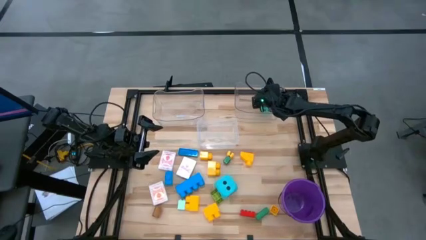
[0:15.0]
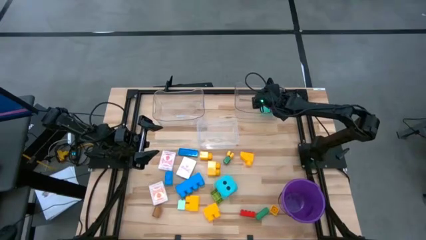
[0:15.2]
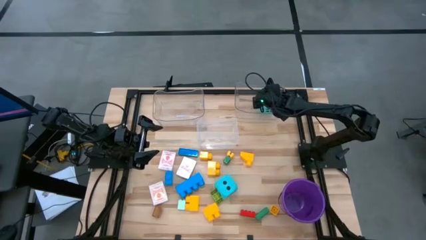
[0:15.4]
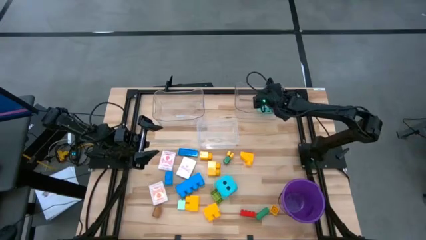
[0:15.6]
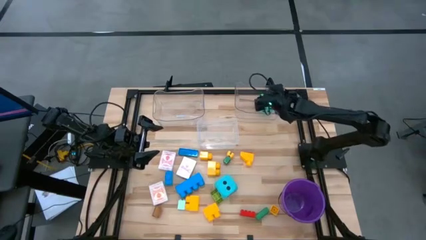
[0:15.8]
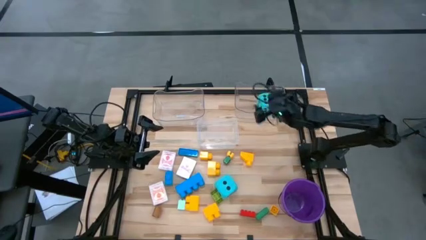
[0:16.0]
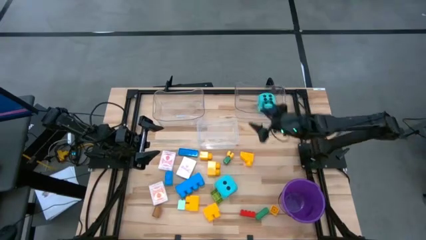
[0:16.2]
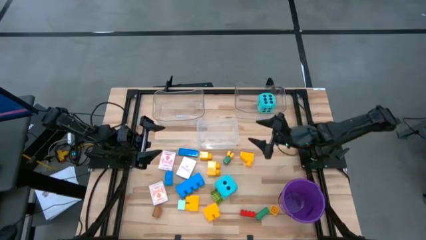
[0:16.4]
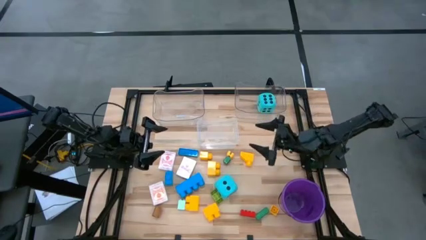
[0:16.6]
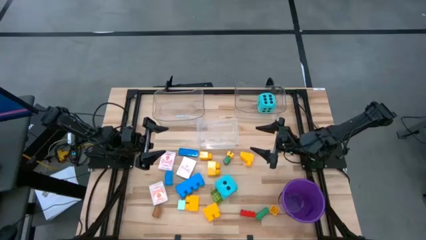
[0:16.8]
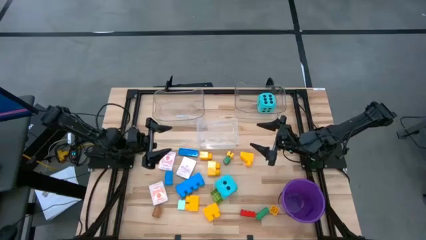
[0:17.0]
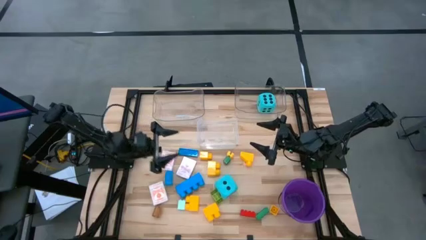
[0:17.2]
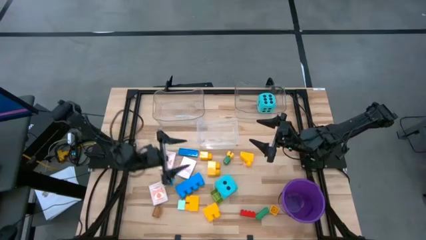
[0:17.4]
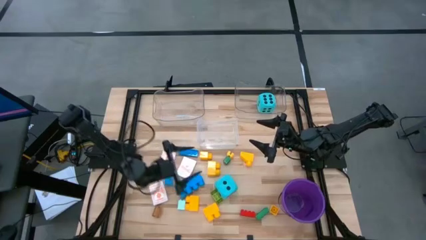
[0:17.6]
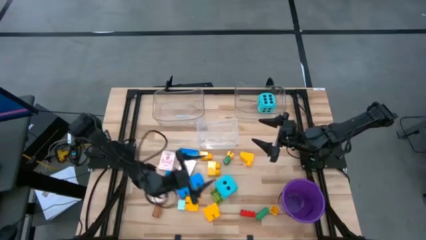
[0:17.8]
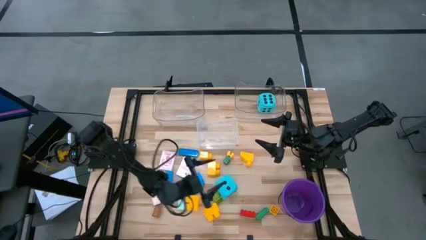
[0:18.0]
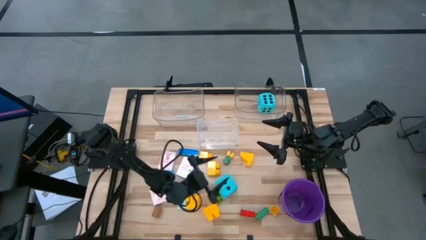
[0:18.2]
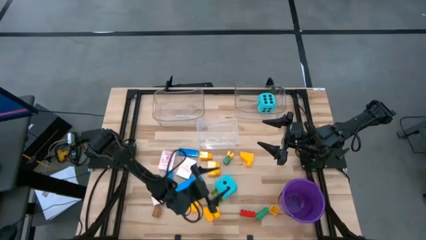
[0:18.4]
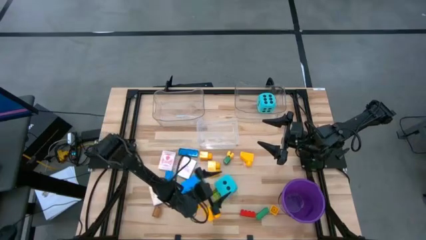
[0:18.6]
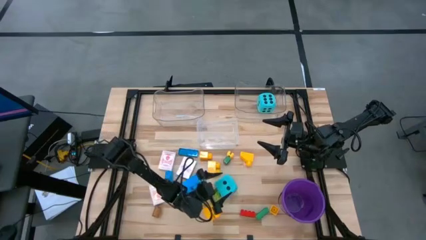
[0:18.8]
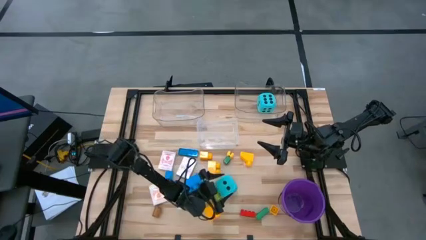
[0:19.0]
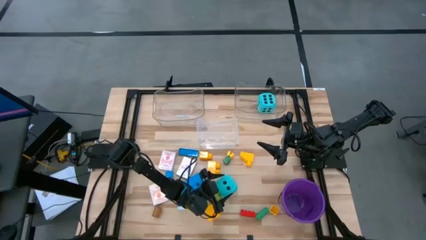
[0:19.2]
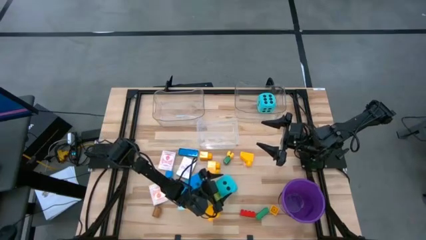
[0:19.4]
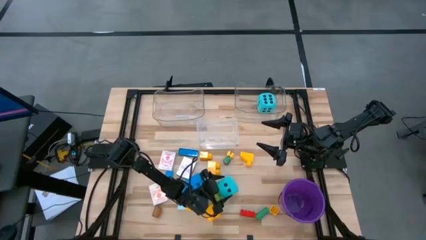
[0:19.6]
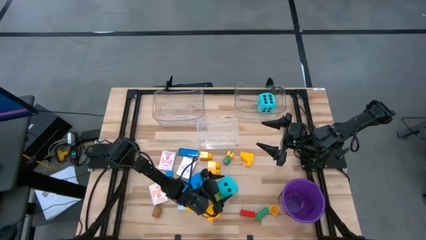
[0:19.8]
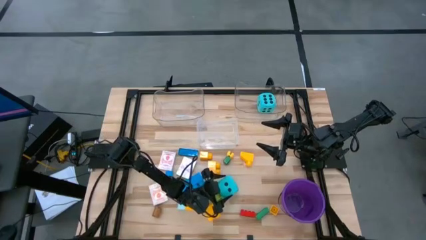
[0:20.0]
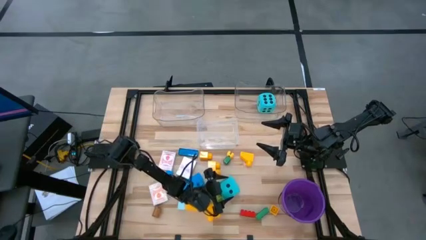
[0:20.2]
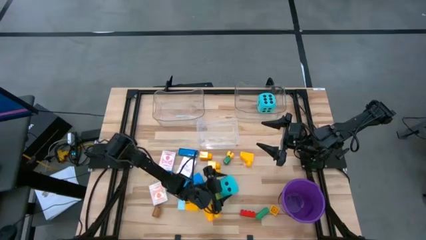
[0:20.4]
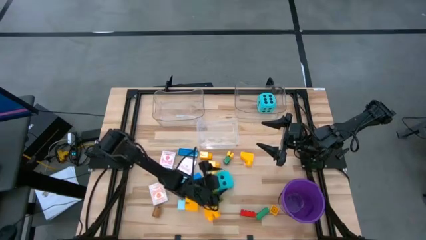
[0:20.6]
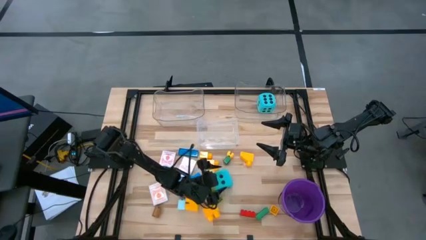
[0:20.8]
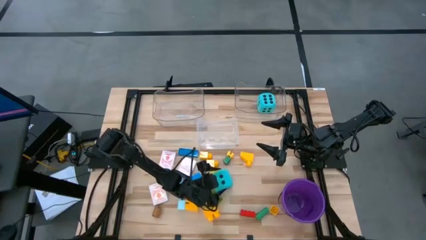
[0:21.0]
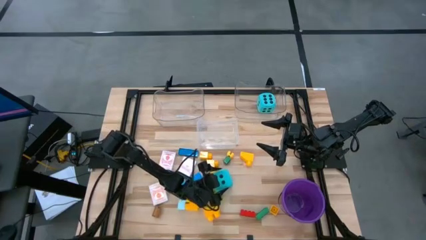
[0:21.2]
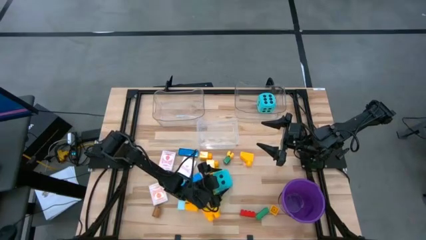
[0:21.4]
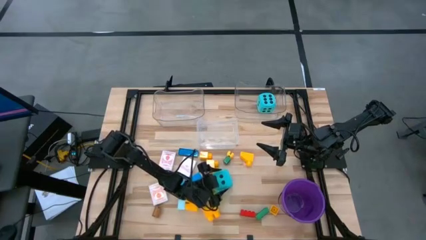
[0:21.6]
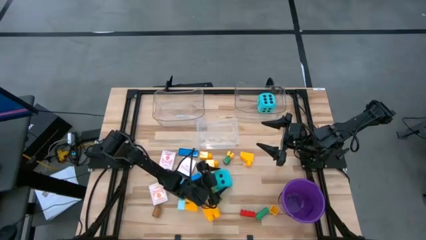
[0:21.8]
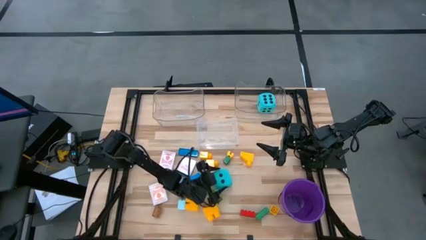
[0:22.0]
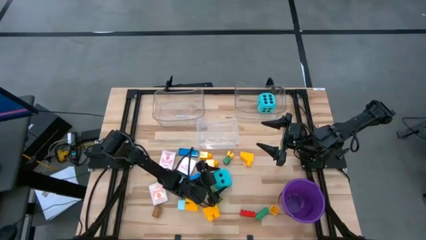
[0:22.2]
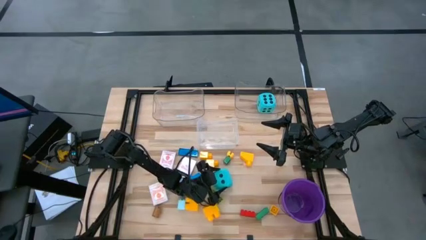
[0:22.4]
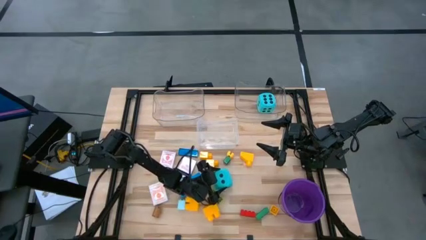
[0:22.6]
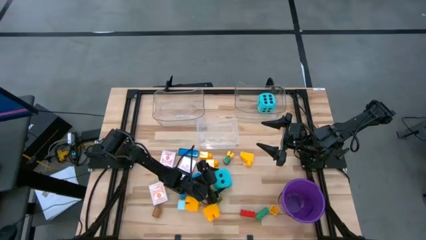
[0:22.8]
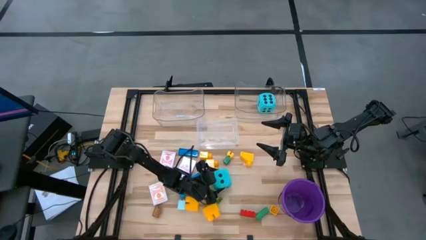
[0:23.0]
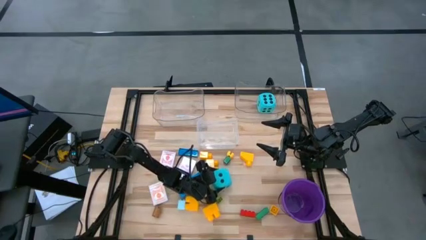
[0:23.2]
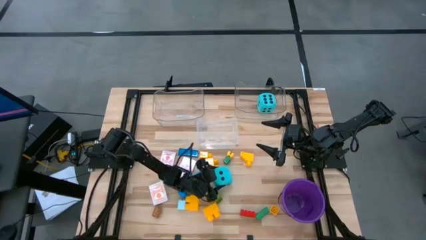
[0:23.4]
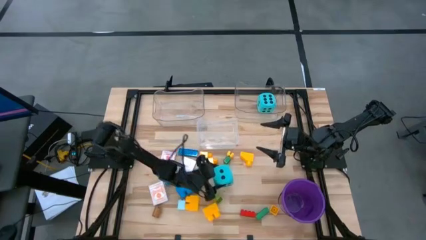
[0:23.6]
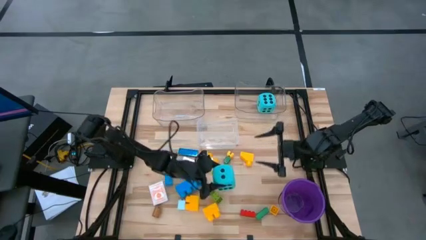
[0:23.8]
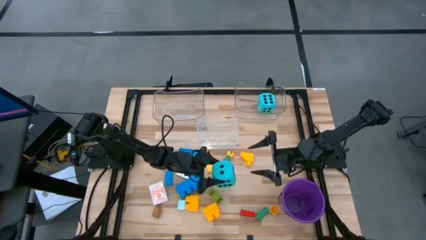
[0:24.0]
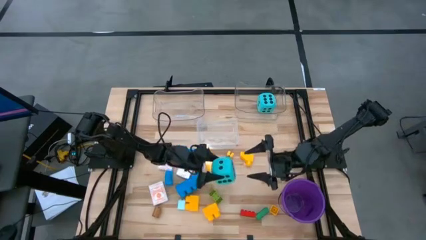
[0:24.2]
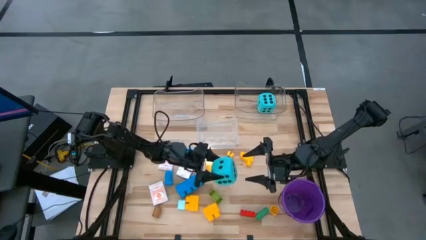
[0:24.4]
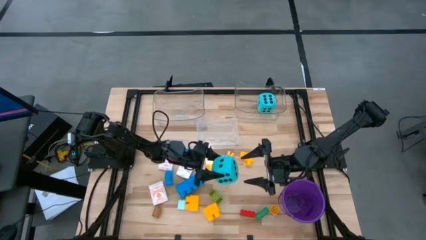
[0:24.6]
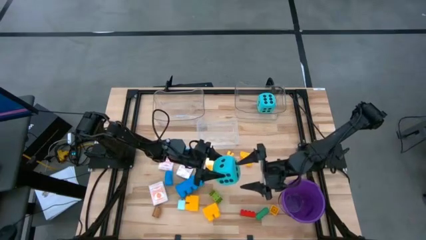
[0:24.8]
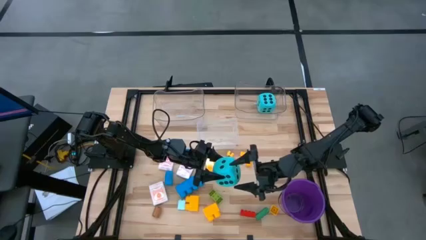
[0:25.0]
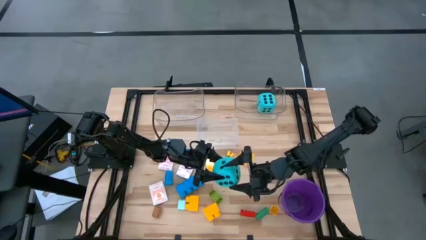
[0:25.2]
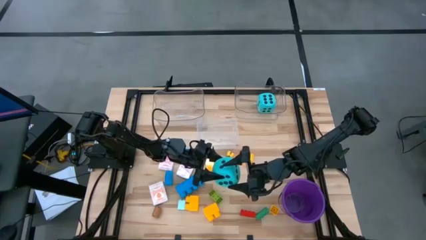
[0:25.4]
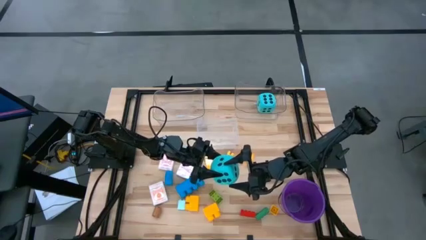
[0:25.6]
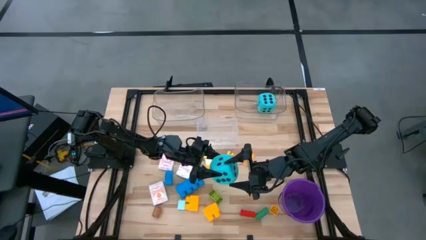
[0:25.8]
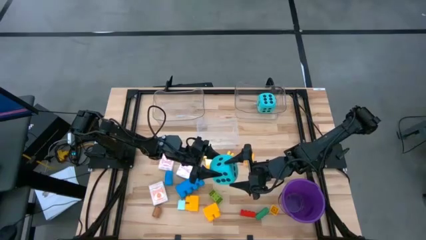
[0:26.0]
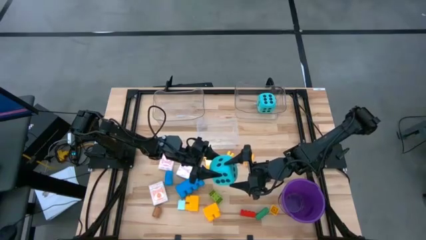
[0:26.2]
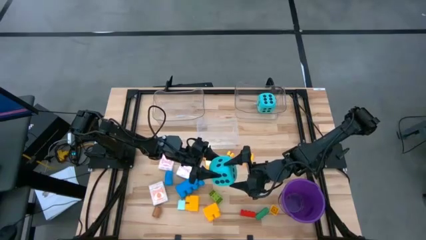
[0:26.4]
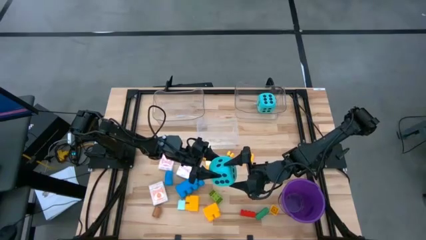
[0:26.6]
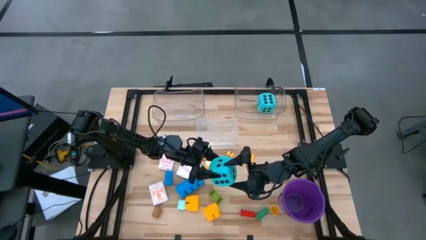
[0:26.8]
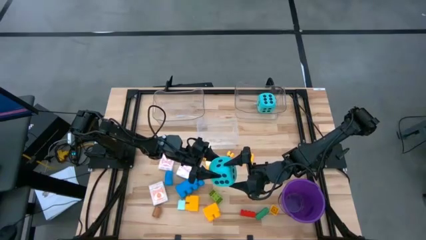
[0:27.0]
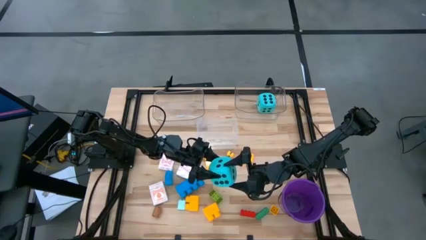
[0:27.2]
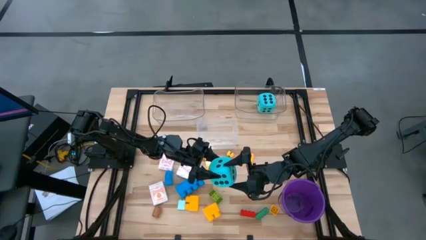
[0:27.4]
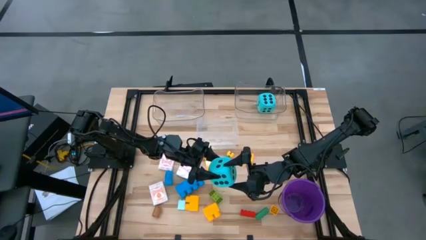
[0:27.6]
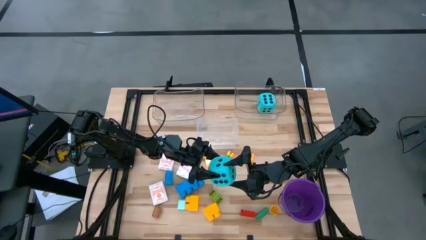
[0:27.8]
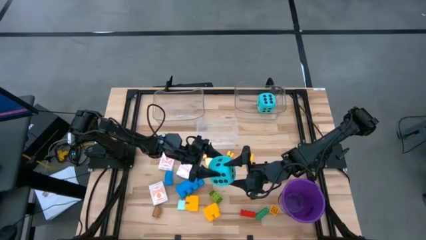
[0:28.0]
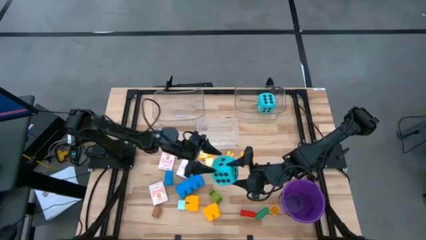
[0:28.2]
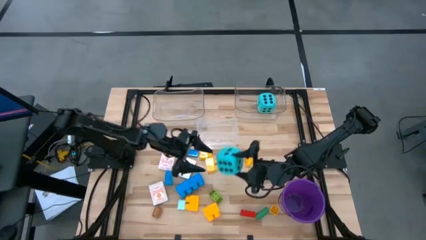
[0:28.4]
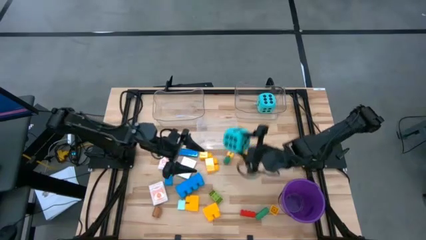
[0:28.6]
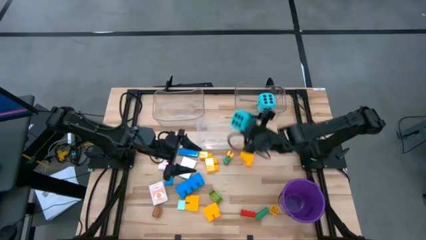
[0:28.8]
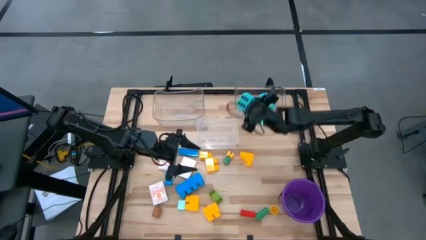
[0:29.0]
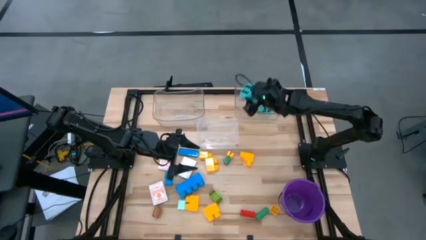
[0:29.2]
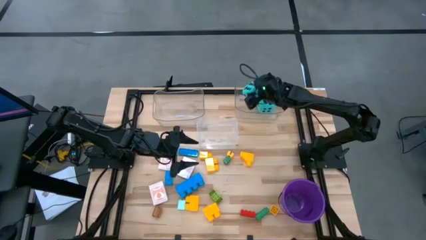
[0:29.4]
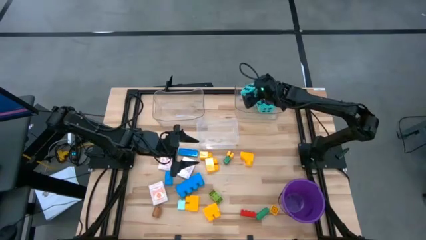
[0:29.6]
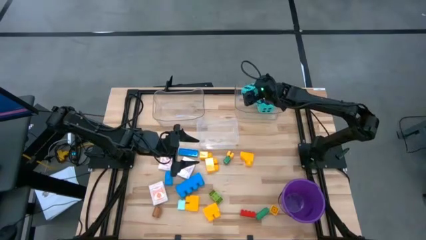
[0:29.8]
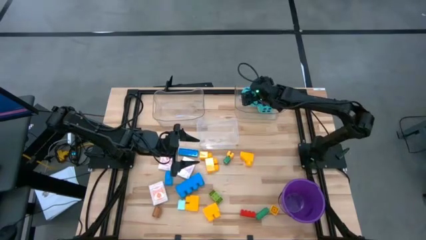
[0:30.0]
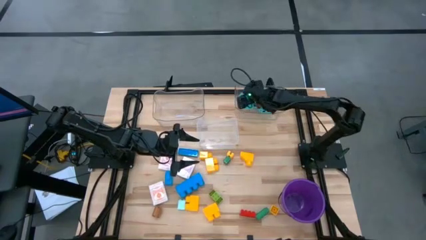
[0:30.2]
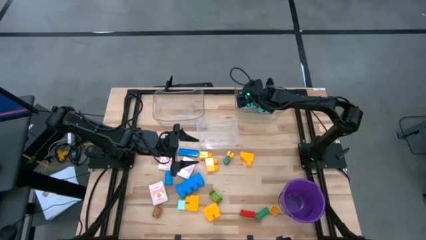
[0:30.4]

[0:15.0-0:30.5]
Task: Pick & Place Toys
Put the blue dice into the top right transparent bin
